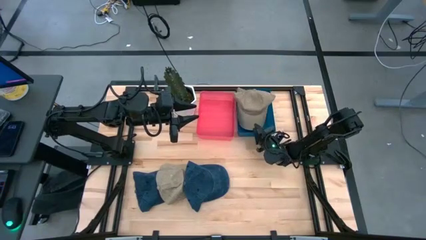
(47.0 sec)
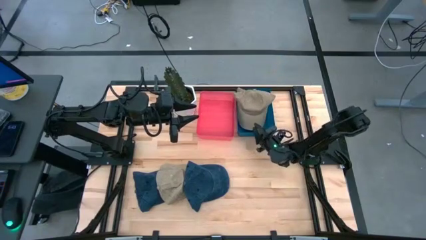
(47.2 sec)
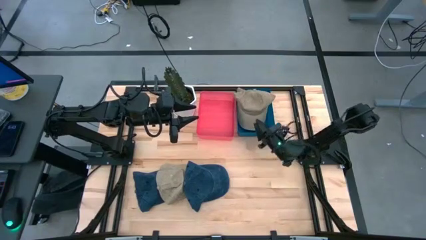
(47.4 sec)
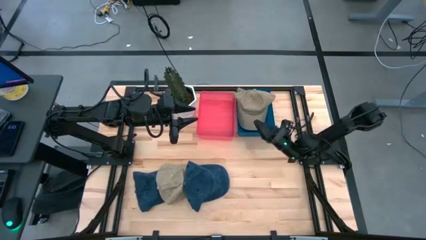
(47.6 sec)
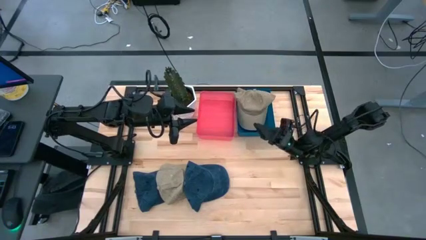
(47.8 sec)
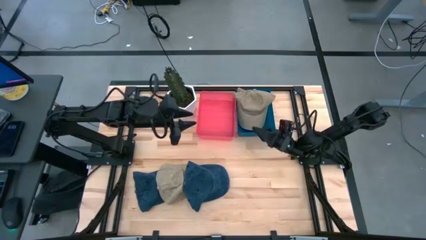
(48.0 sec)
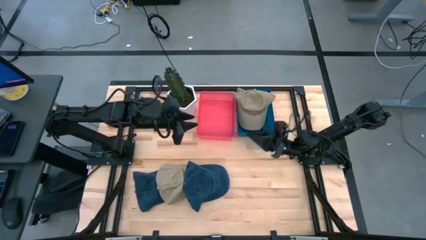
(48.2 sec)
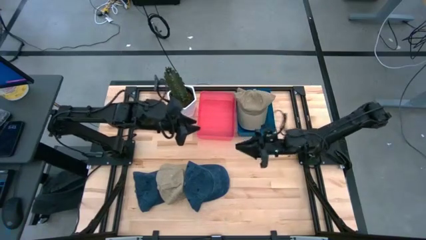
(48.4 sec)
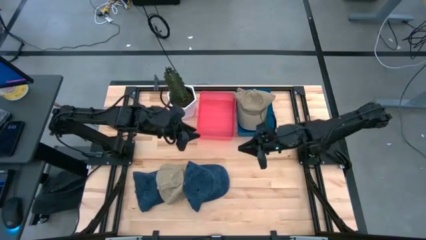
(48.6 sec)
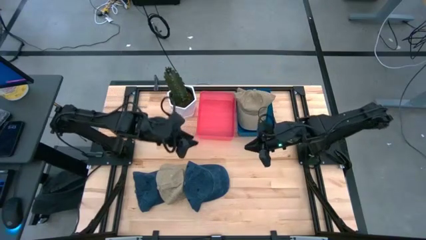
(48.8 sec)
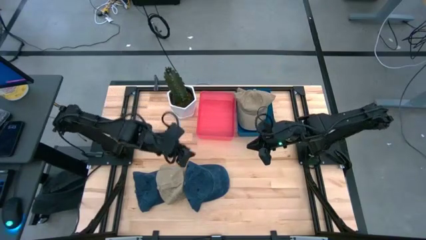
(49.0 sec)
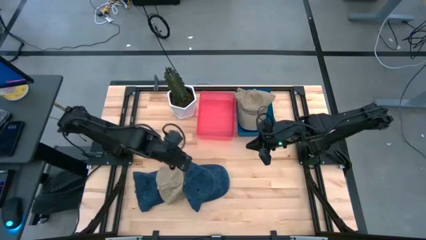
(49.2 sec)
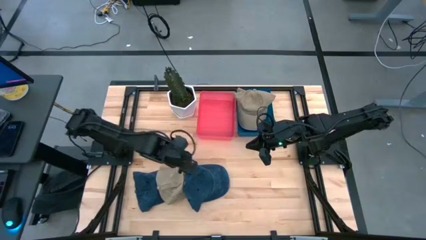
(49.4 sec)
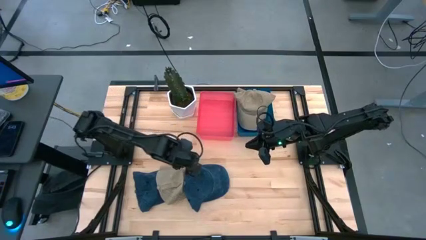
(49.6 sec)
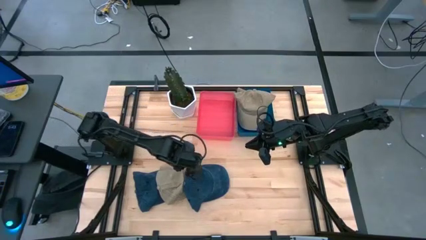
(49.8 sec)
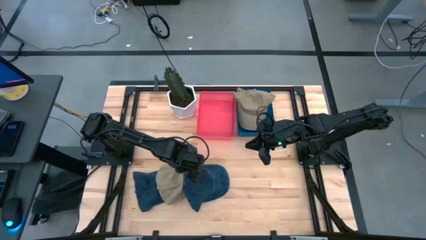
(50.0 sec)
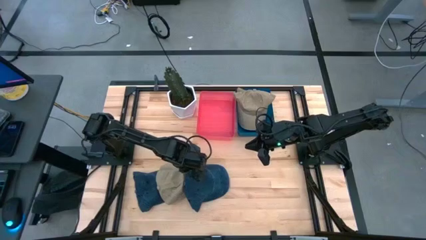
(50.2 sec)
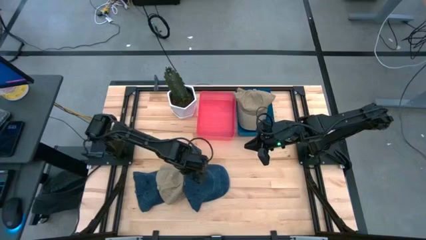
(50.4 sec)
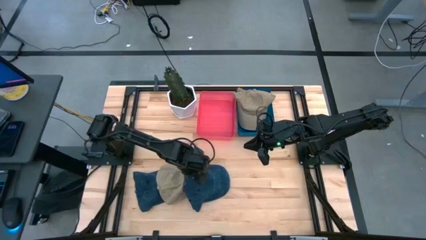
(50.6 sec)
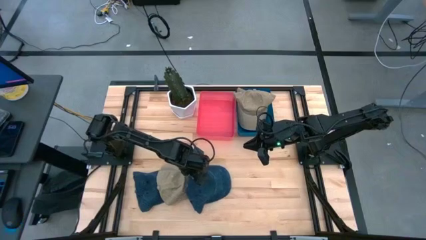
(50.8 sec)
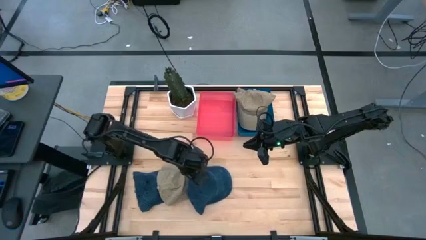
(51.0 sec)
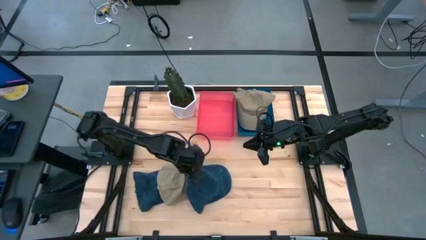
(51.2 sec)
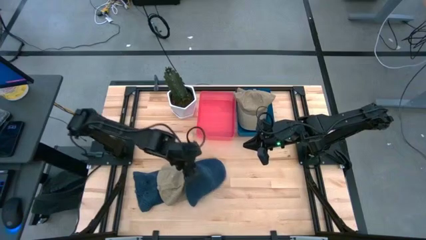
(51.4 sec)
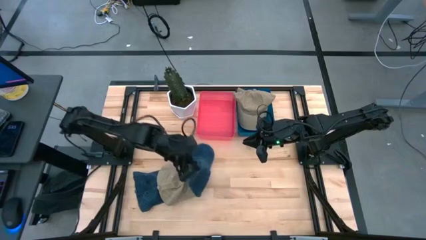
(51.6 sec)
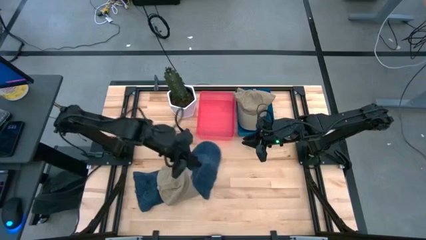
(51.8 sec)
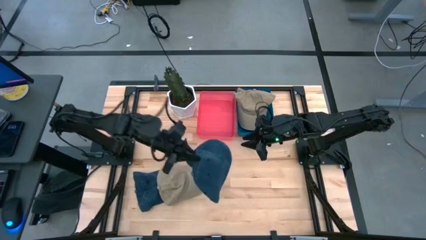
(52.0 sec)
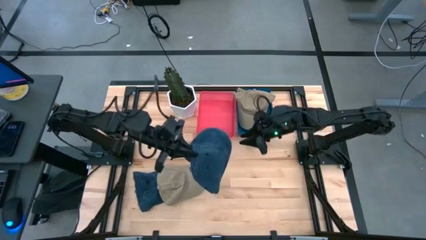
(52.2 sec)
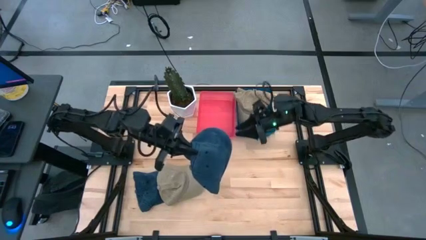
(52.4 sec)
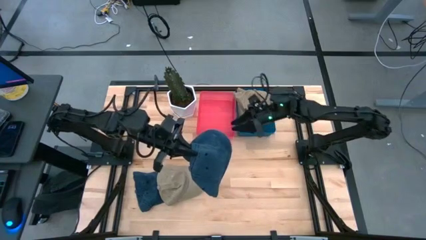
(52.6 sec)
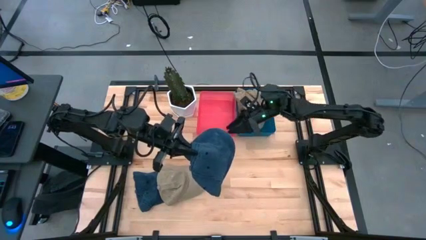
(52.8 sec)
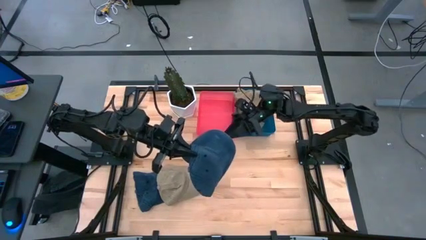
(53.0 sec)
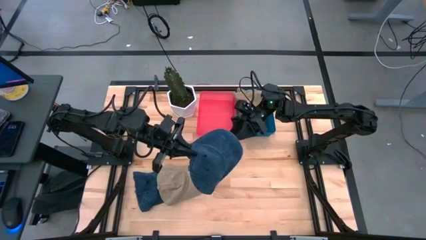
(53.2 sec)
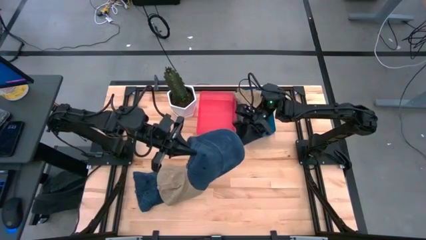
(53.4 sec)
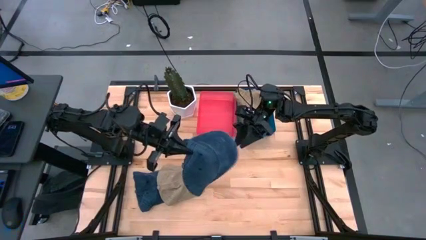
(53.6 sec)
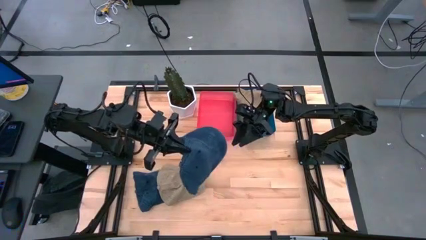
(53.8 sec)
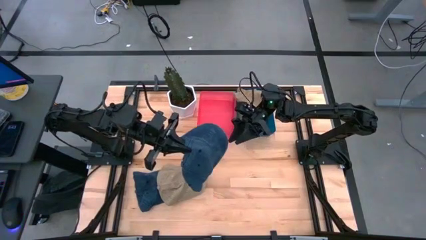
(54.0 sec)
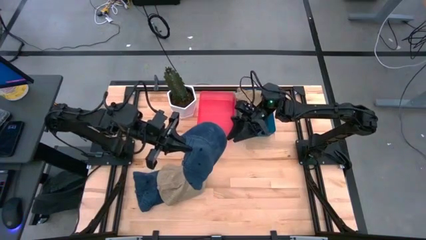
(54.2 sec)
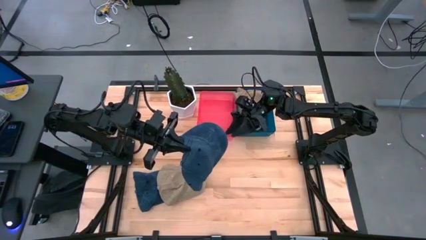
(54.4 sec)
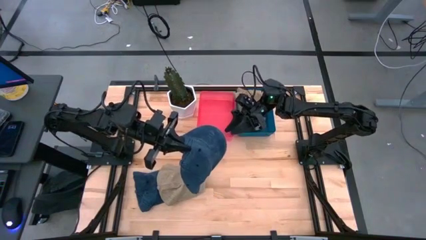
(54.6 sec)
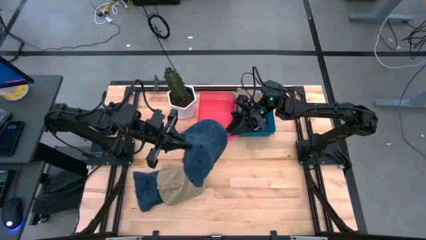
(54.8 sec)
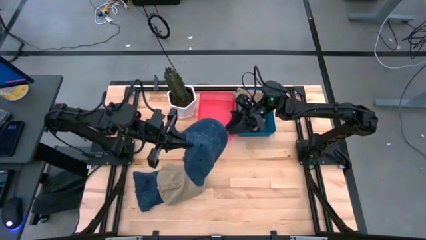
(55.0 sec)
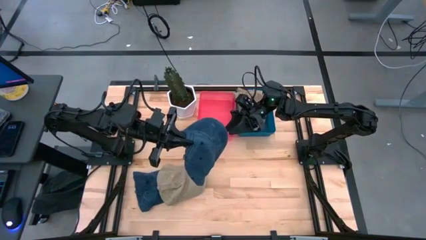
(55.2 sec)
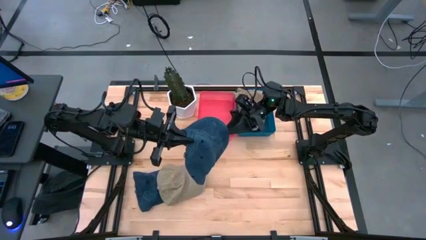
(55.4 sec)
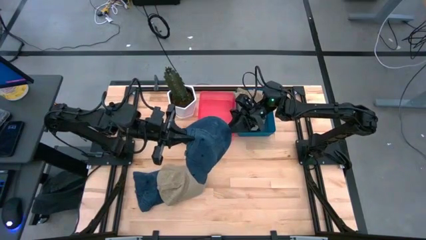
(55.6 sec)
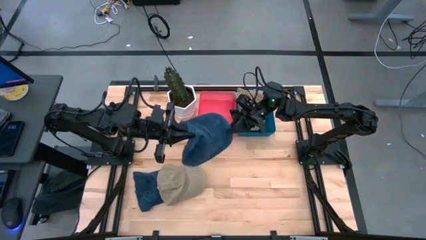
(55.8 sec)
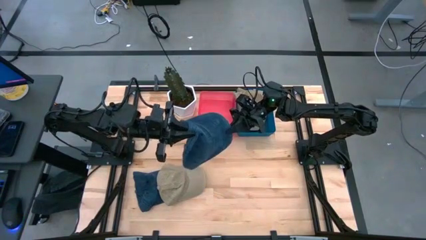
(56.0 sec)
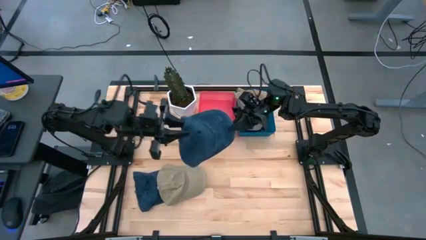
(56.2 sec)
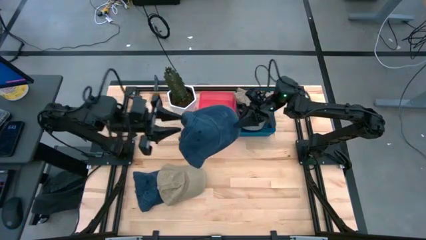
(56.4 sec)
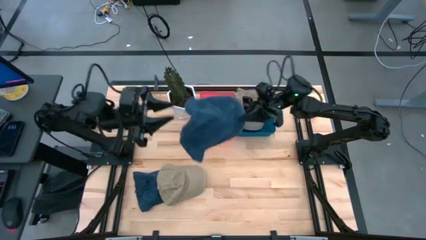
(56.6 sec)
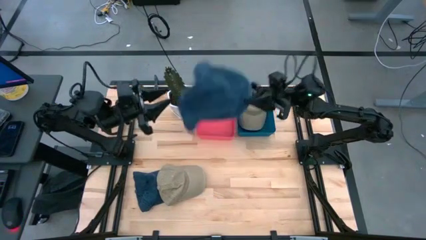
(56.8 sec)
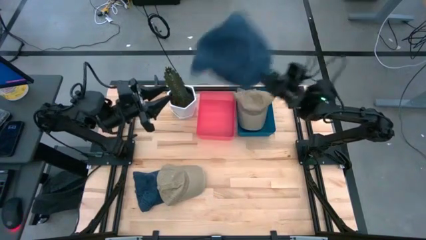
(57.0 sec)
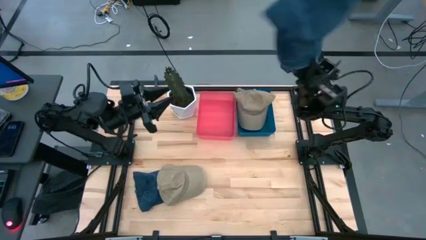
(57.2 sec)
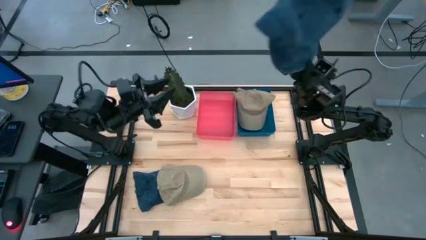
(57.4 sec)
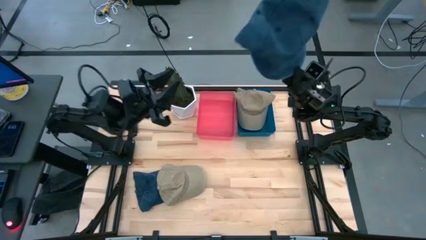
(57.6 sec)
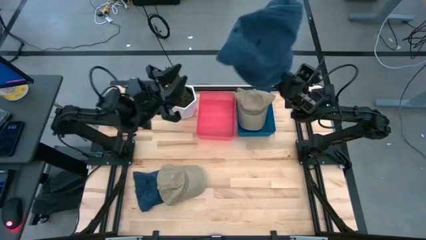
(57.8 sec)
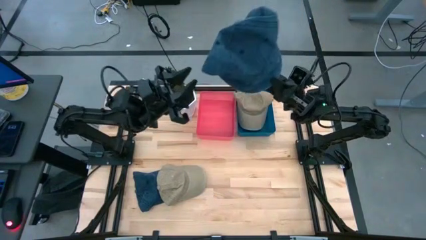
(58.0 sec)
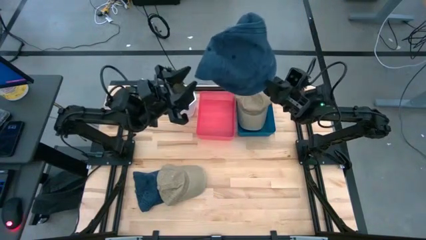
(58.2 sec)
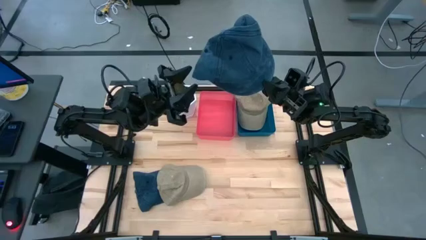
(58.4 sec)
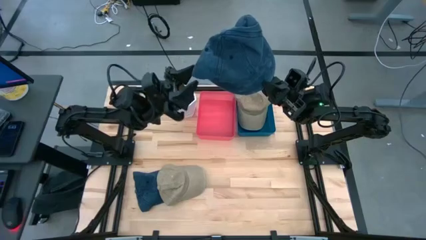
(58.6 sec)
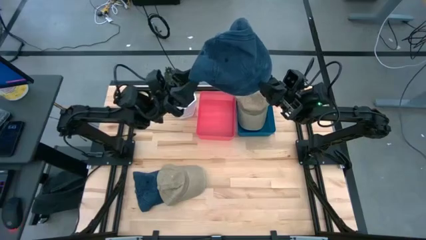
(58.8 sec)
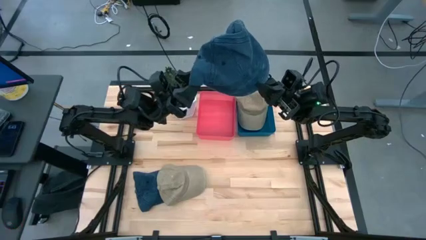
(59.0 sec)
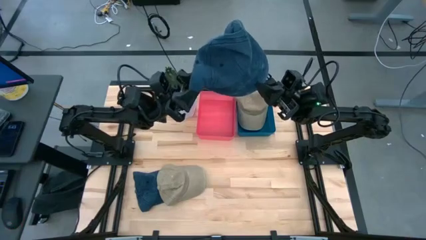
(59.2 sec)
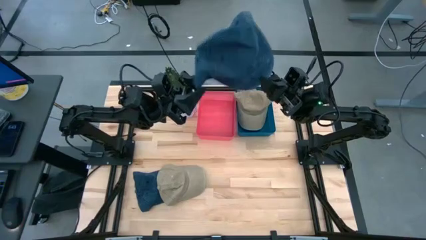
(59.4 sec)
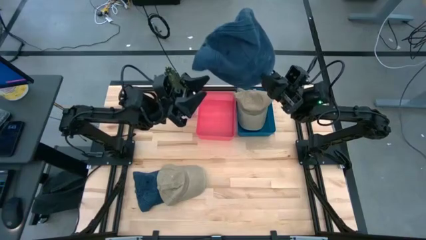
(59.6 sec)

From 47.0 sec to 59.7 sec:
Task: Pick & Place hat
Put the right blue cap into the pink bin

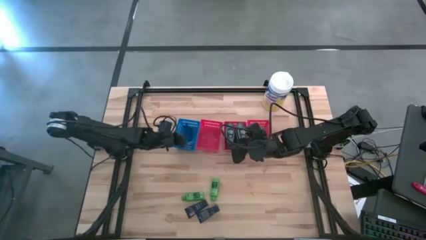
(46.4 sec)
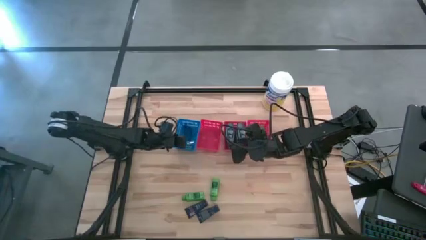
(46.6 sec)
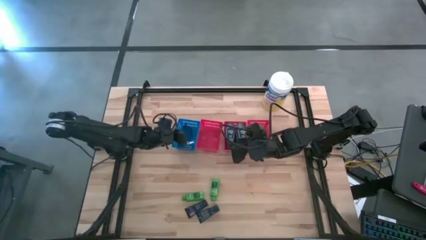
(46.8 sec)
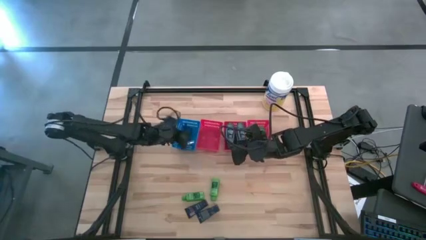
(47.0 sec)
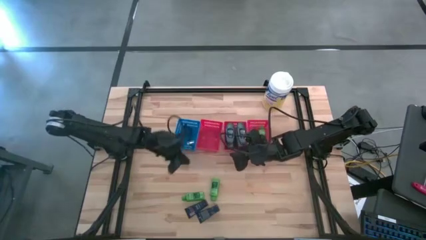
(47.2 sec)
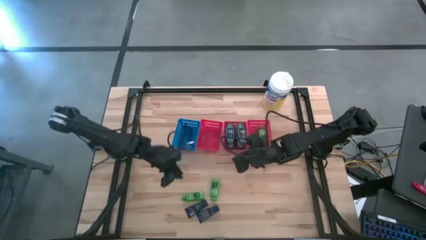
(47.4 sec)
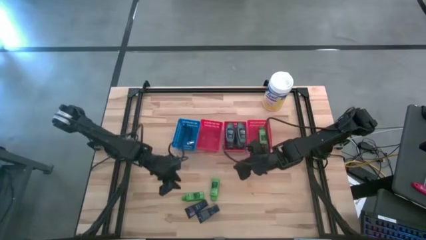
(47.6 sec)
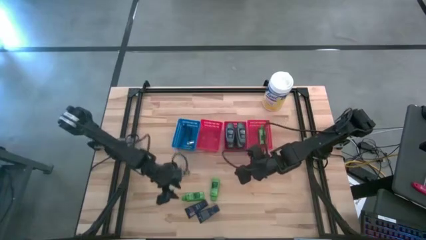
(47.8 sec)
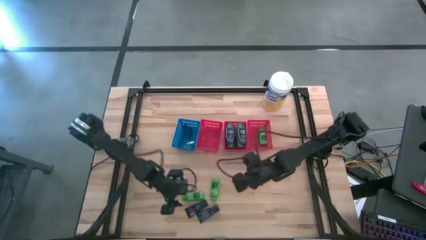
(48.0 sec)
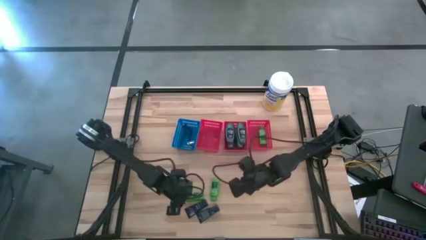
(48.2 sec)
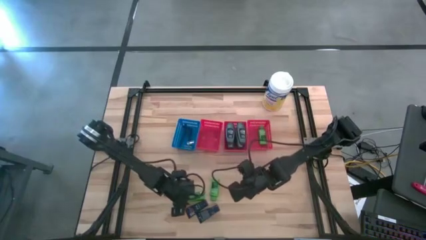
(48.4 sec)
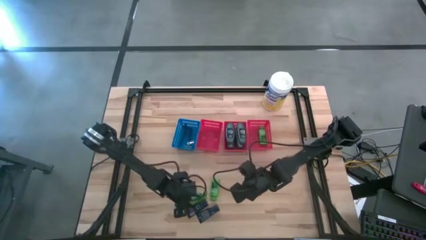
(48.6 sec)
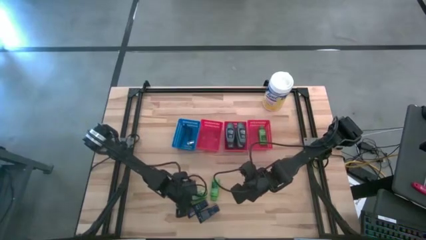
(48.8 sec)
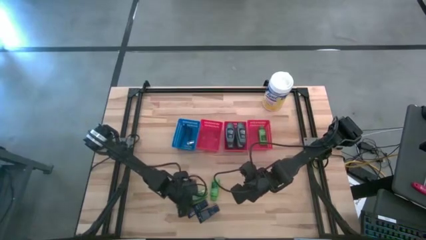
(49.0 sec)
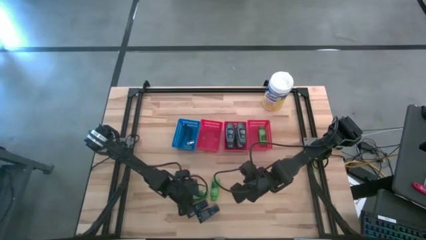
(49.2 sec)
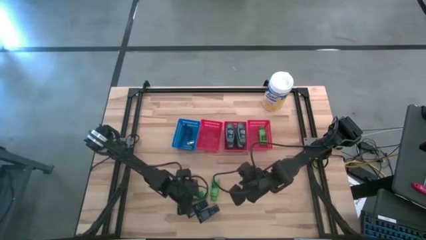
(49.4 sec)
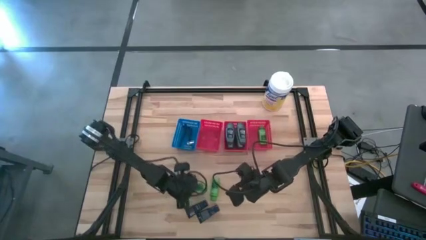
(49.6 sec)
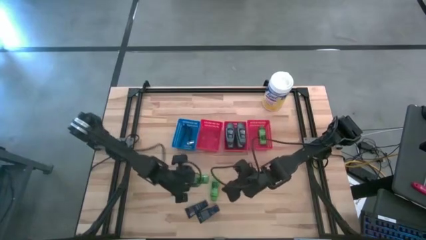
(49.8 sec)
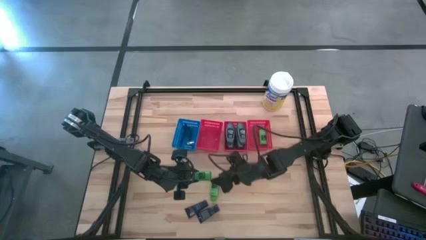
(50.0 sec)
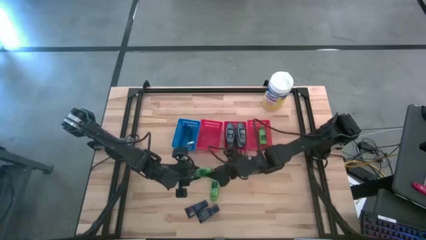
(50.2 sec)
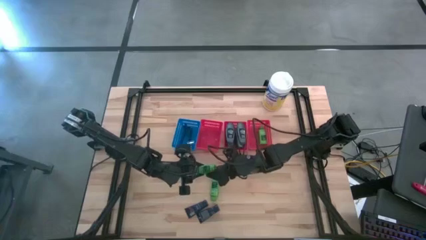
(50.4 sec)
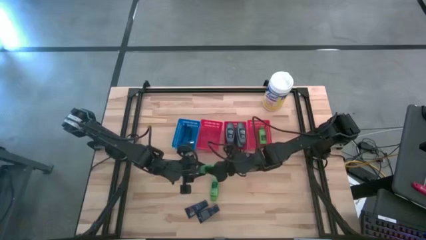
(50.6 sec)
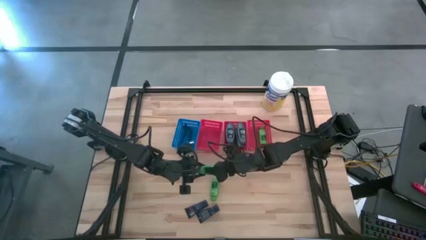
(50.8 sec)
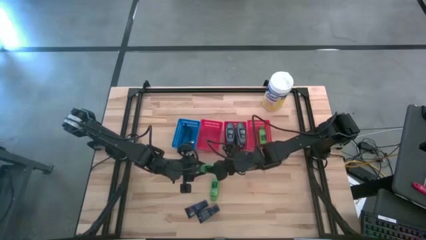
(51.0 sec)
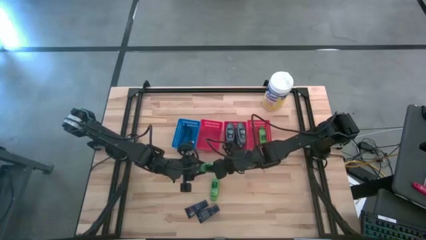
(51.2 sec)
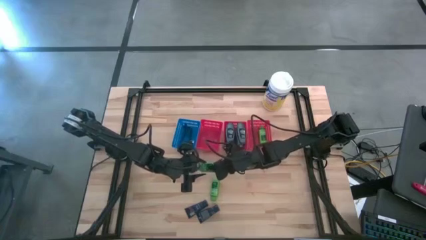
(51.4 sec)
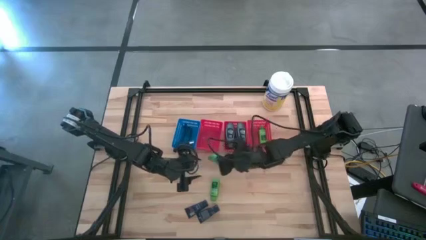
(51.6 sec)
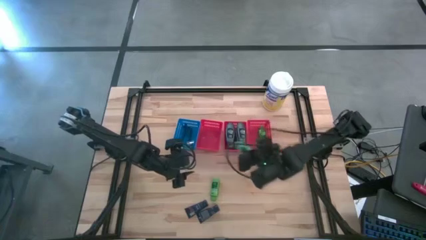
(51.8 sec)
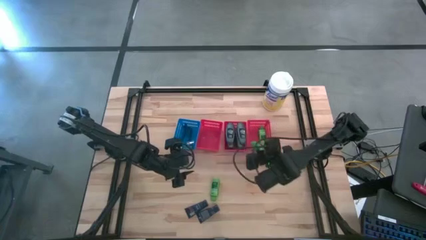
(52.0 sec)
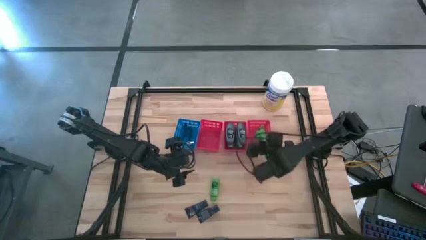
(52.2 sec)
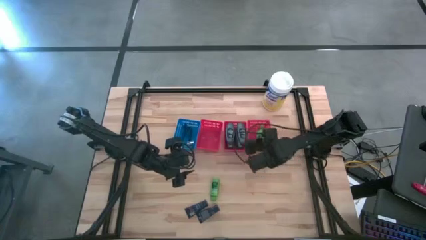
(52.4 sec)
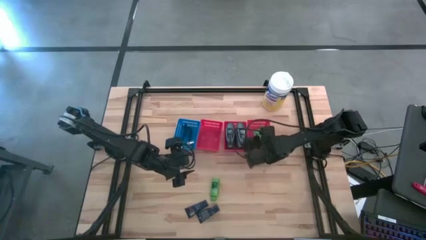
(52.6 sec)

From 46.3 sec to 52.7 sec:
Task: Pick & Place Travel size toiletries
Put the green shampoo bottle into the right red bin
